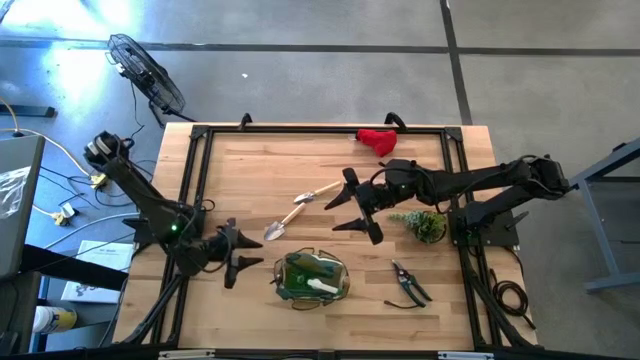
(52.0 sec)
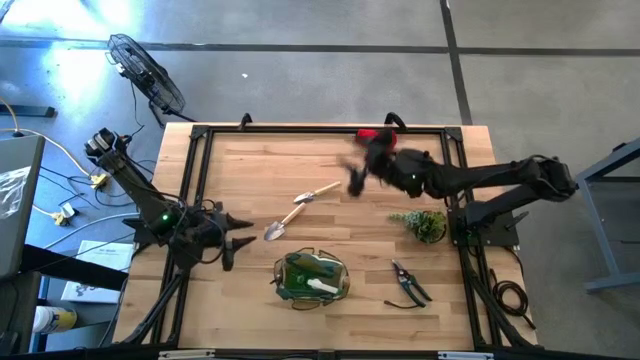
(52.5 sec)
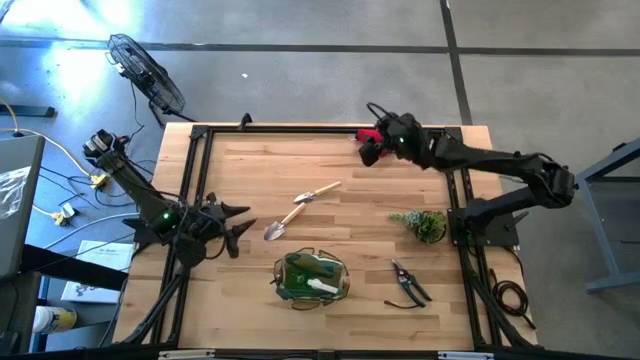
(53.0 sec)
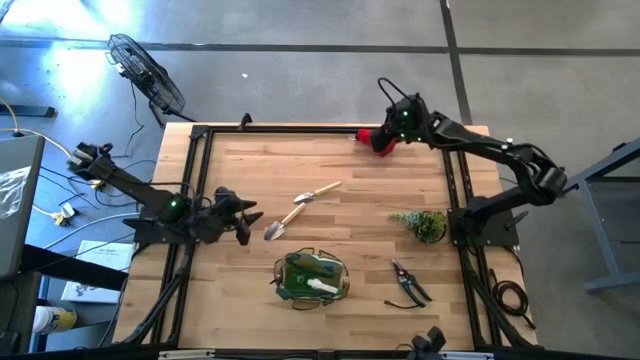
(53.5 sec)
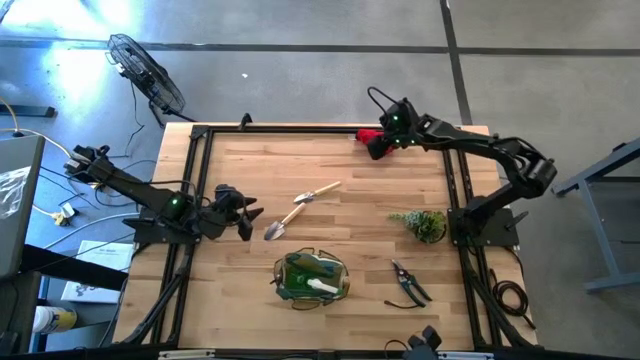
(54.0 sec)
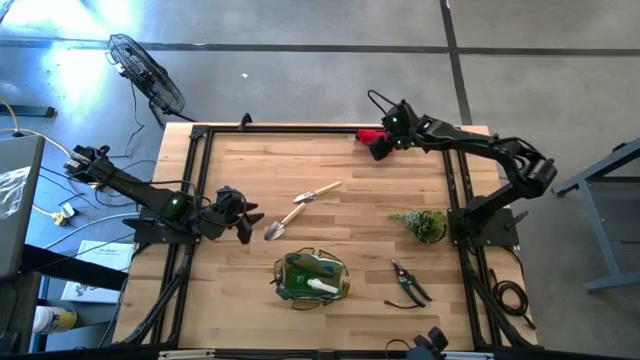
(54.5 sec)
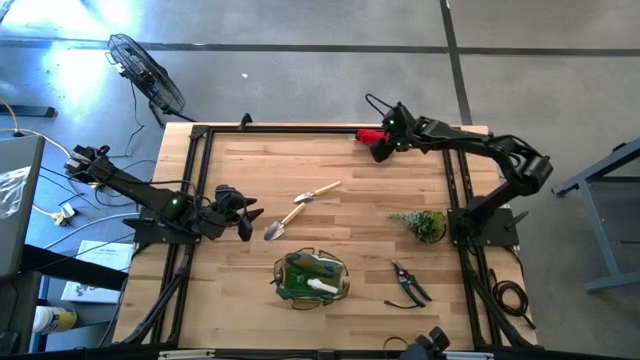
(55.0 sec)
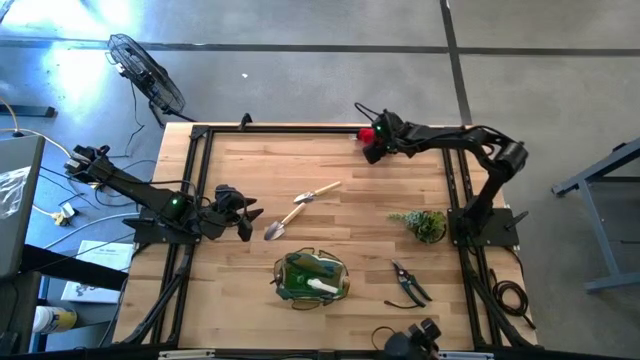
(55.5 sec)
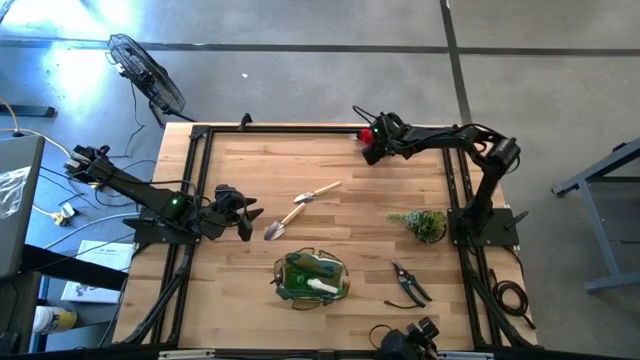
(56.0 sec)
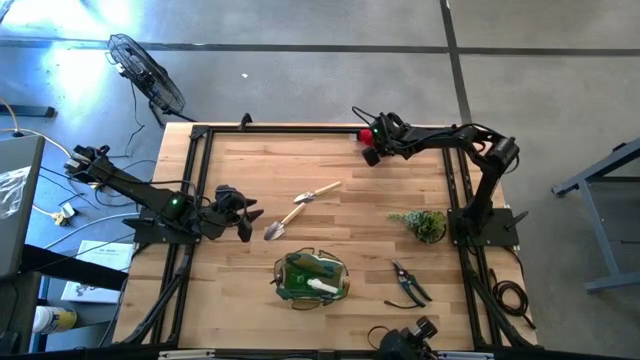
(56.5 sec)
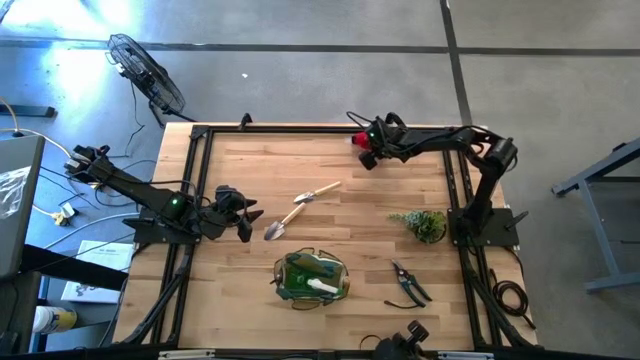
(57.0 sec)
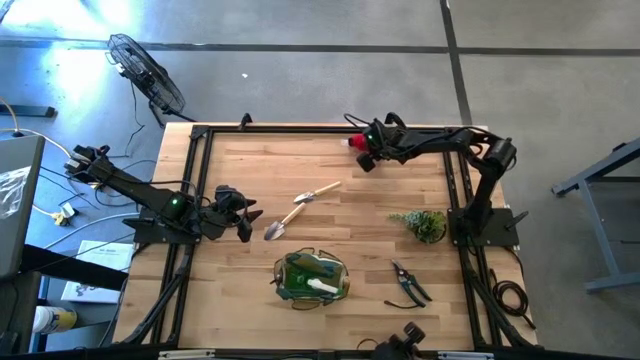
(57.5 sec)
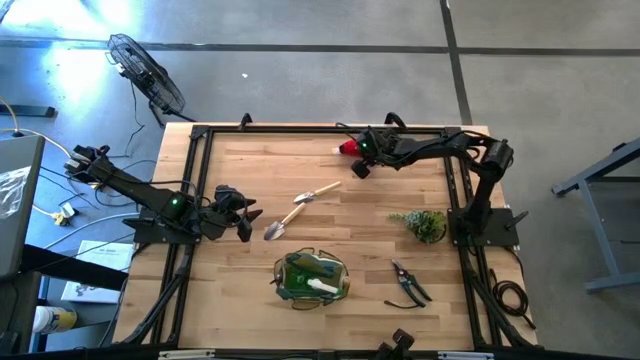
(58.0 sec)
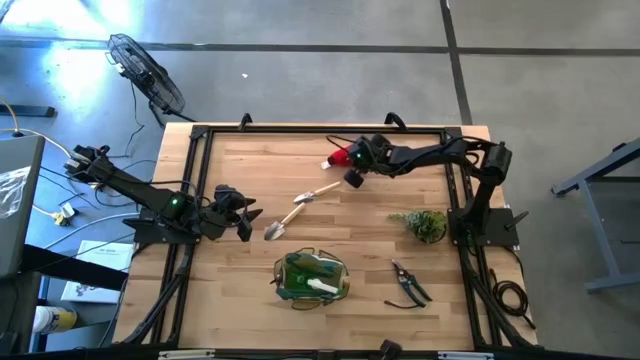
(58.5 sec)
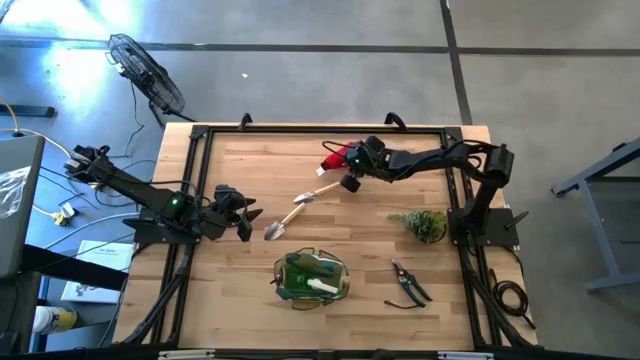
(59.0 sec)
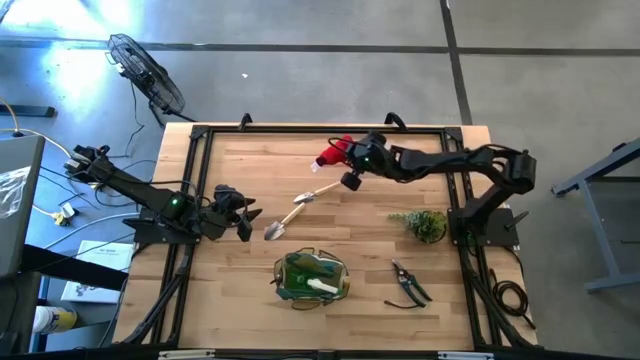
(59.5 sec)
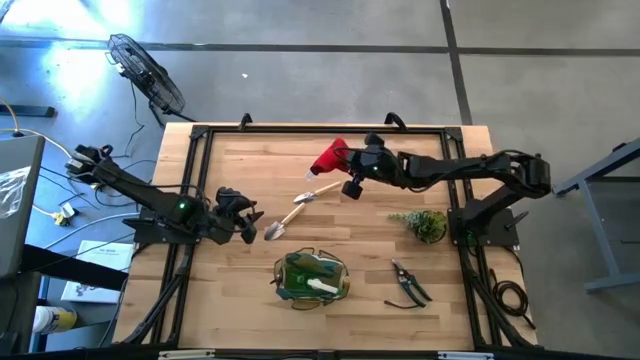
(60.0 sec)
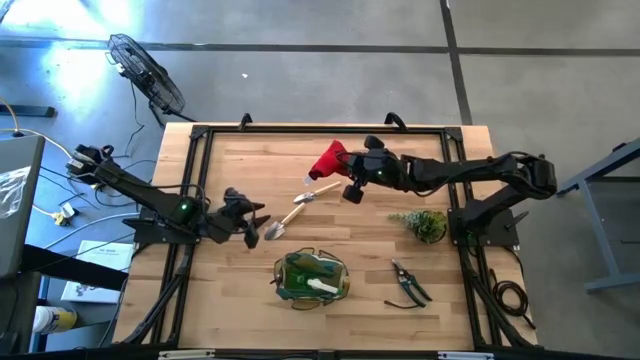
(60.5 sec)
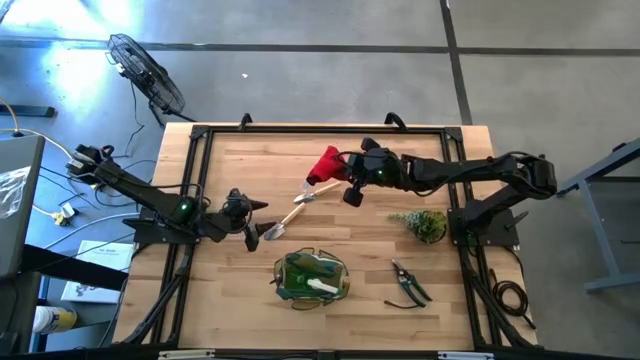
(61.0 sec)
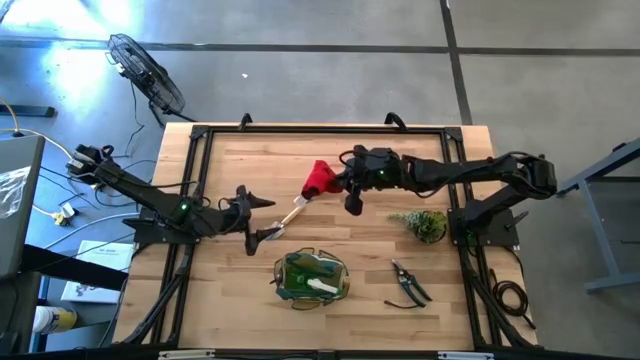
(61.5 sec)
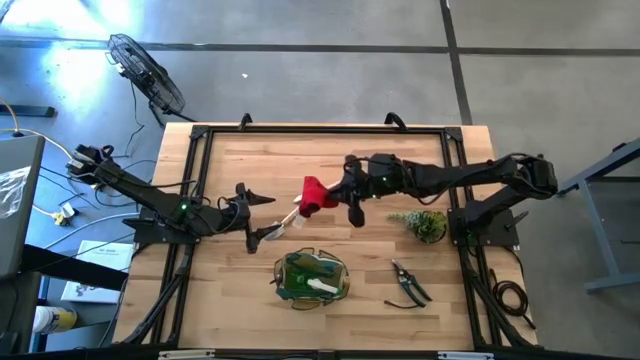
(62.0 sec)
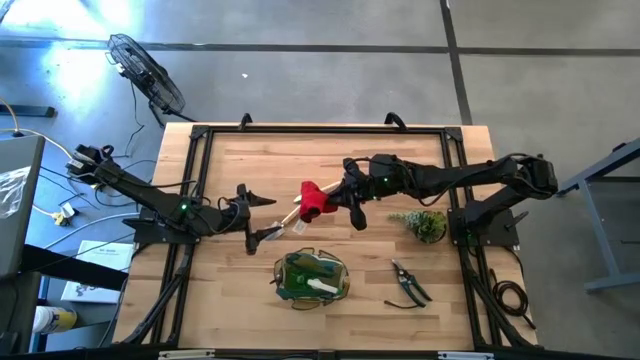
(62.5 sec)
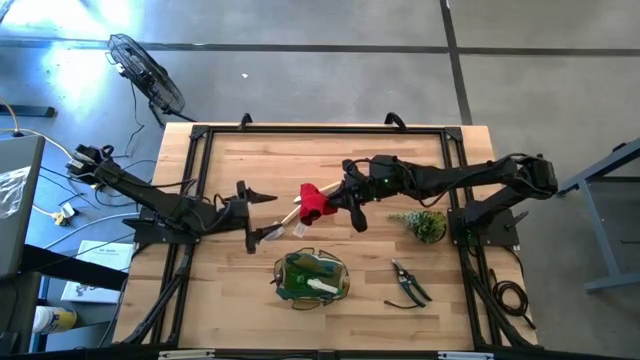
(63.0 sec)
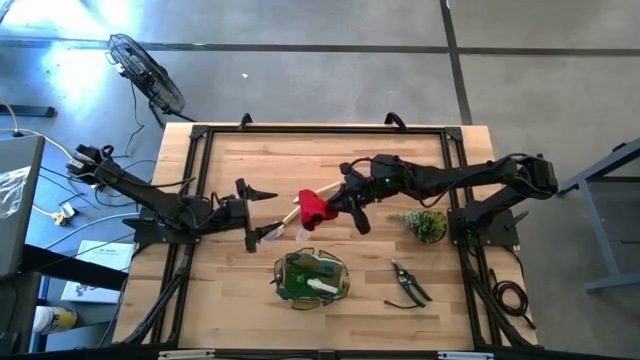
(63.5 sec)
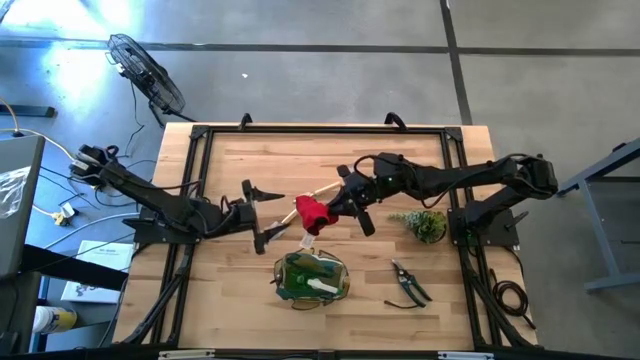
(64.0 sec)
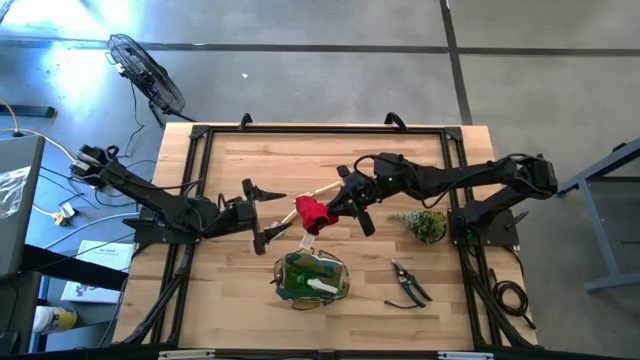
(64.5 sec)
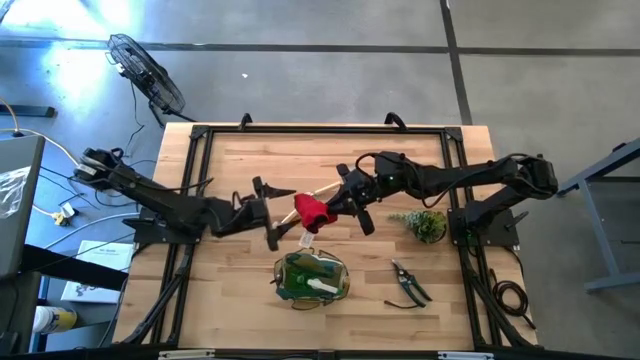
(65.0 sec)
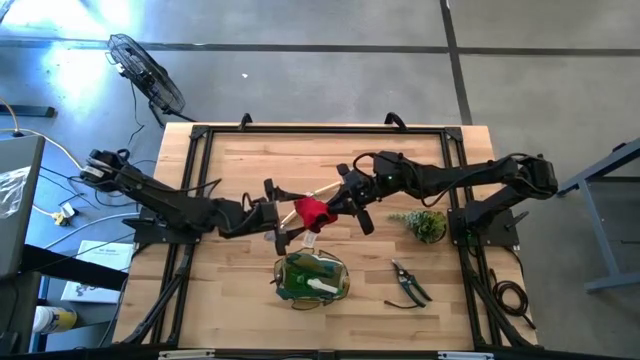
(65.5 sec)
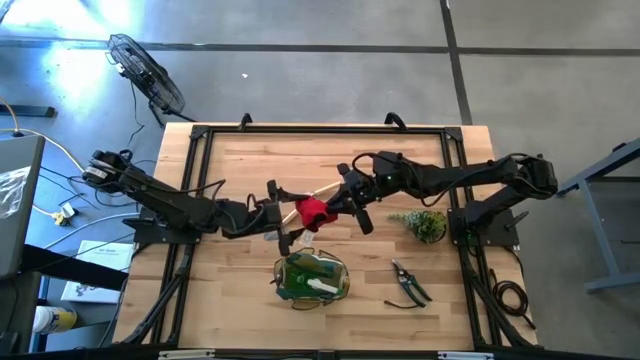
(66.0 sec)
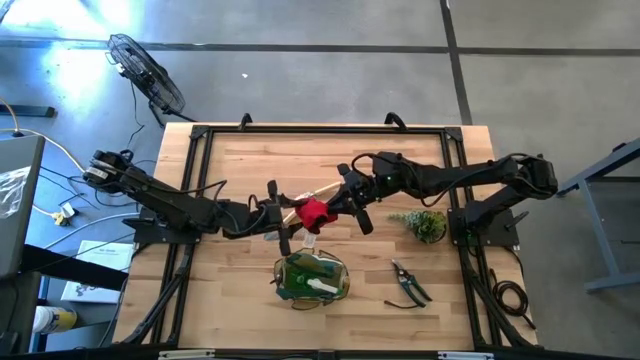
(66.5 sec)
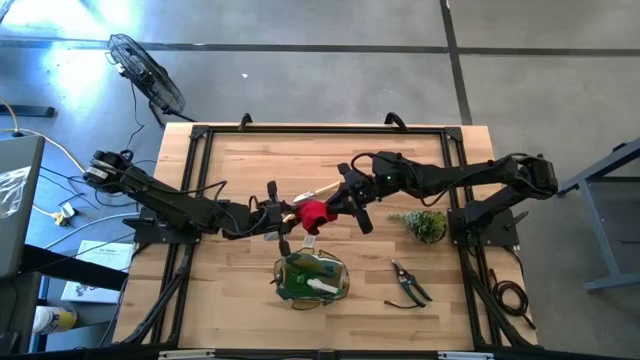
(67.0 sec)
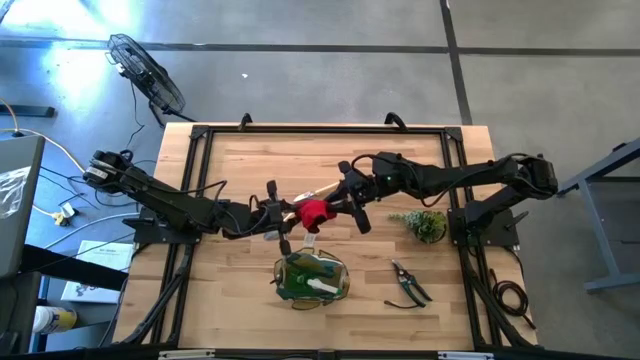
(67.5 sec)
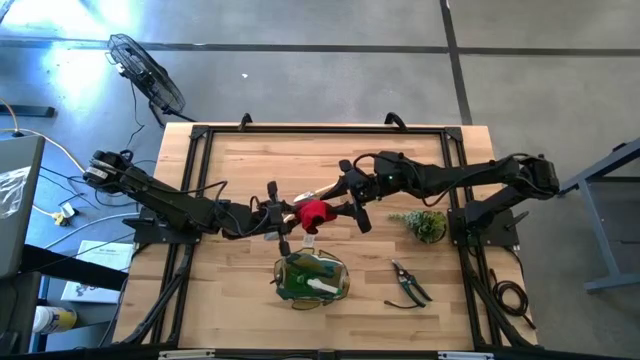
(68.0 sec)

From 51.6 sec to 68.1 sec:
Task: Pick & Place Garden tools in Gardening bag
Put the red gloves into the gardening bag

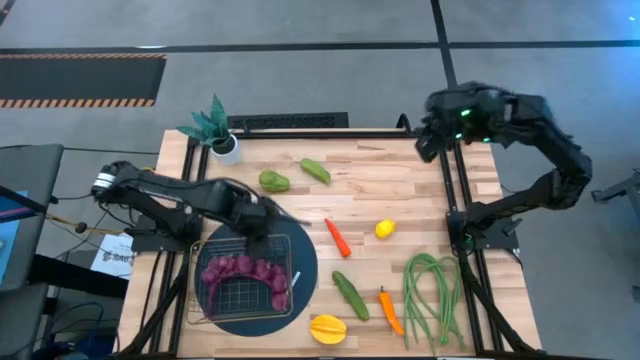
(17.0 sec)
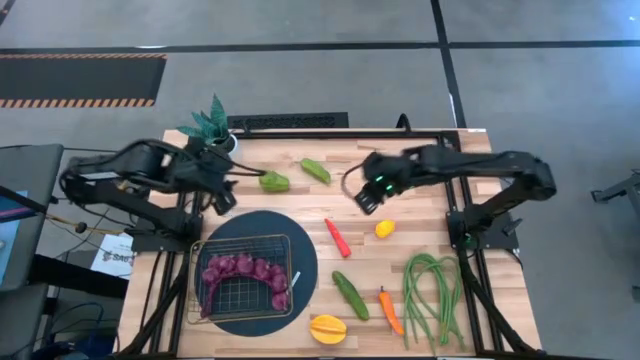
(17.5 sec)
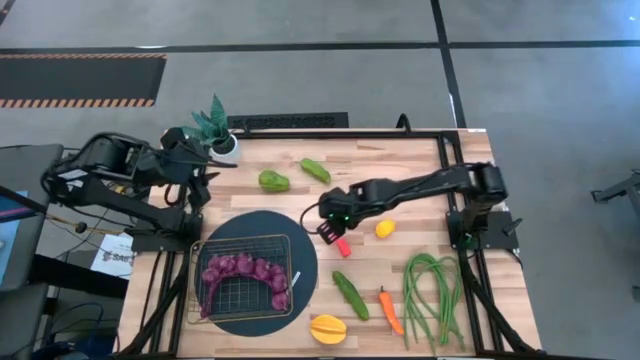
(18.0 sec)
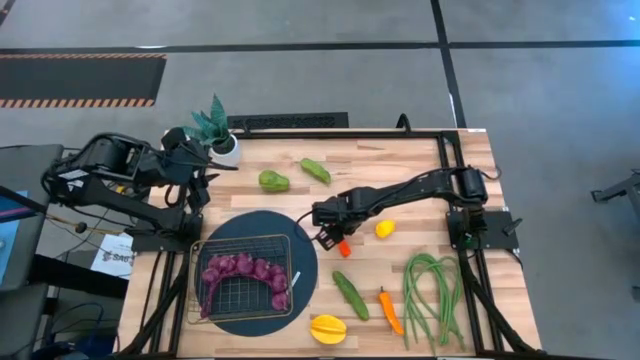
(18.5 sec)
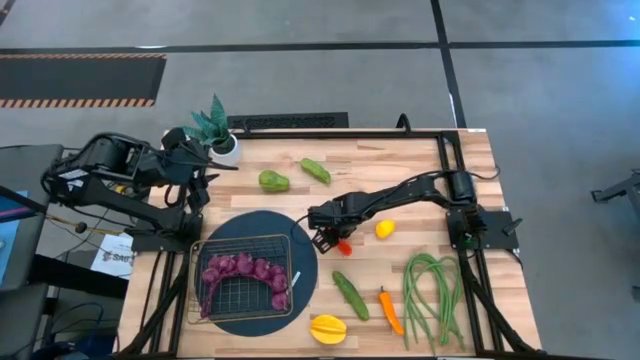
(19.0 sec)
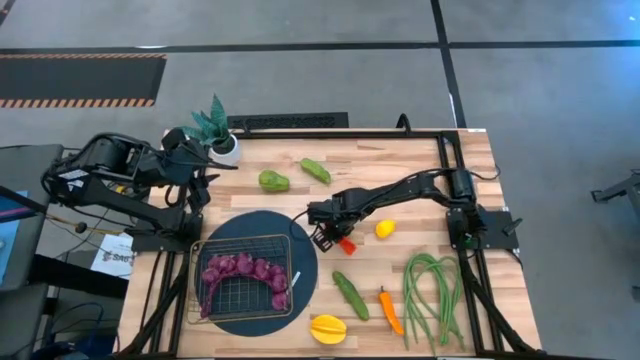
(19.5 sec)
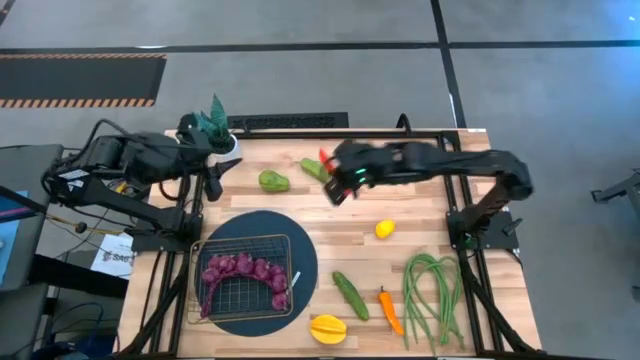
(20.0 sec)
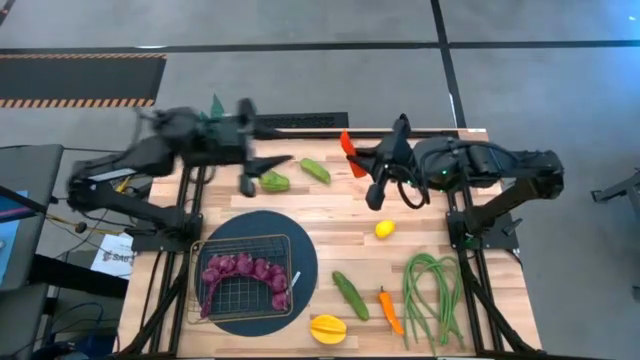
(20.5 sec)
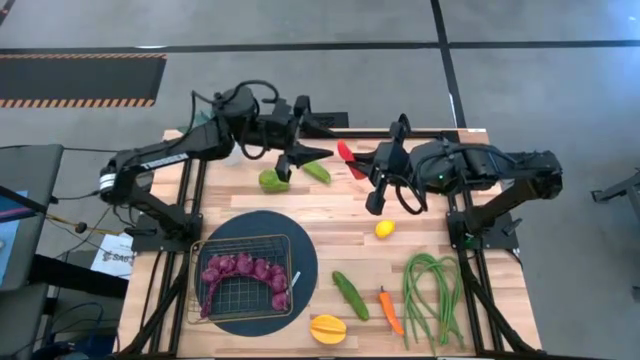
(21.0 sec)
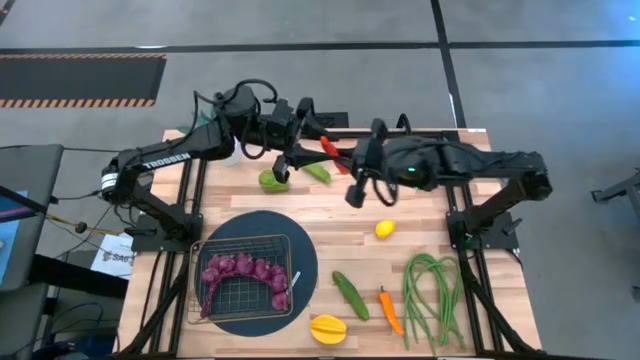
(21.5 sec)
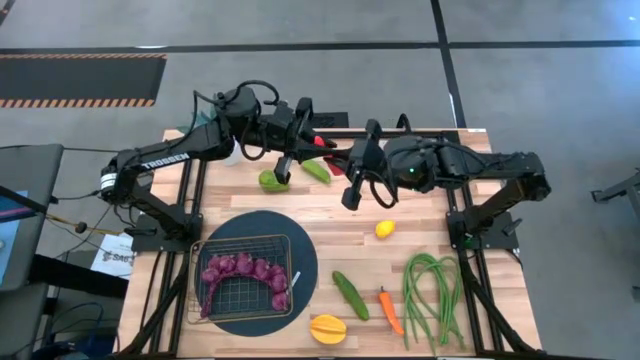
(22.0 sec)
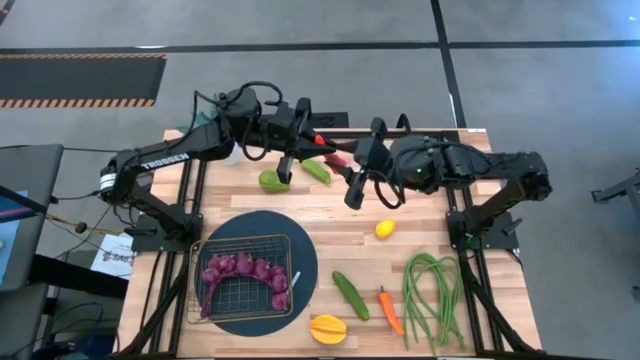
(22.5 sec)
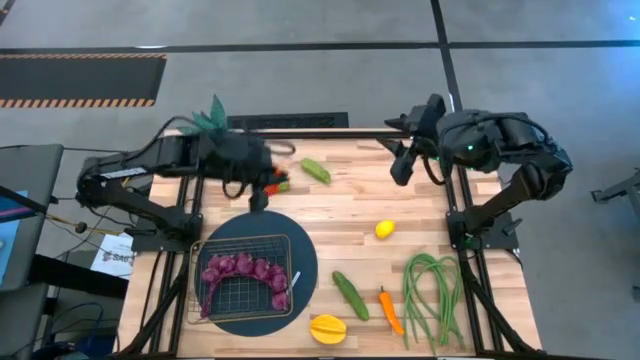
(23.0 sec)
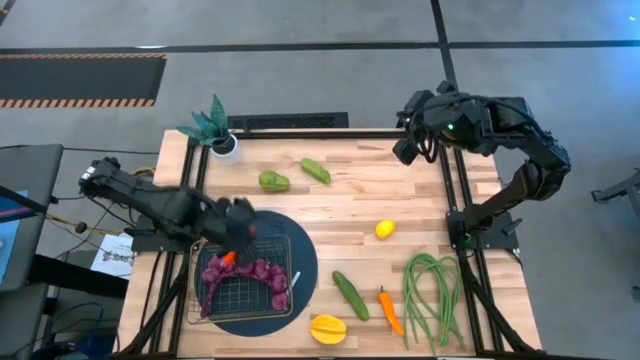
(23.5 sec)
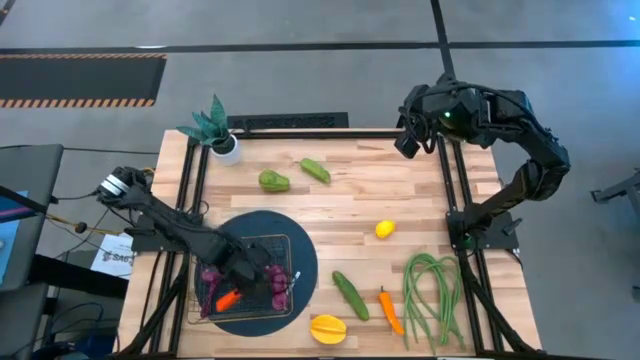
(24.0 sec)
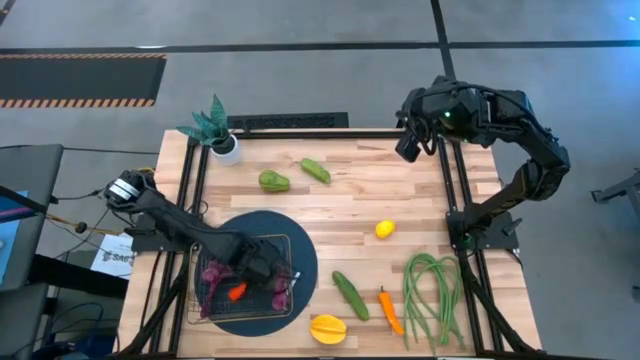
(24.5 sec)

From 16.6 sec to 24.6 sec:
Task: Build produce basket
Put the orange carrot into the wire basket
